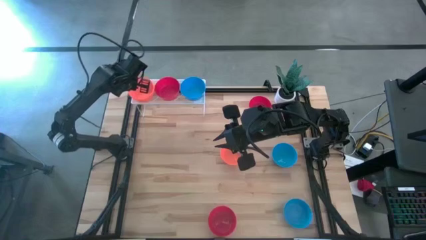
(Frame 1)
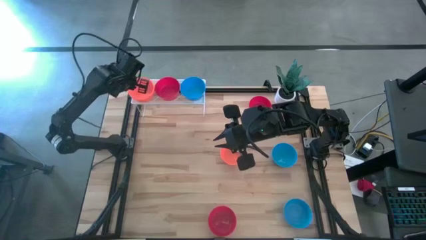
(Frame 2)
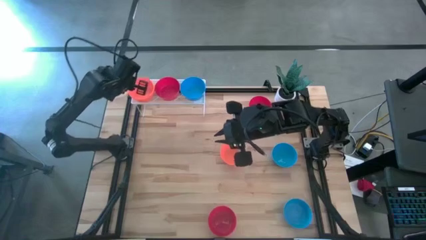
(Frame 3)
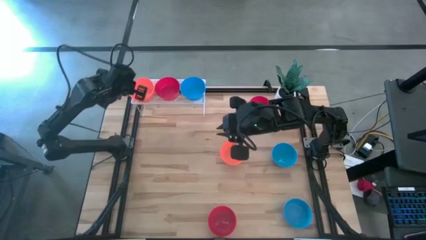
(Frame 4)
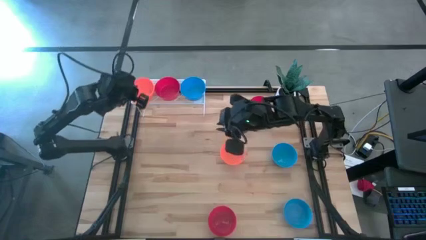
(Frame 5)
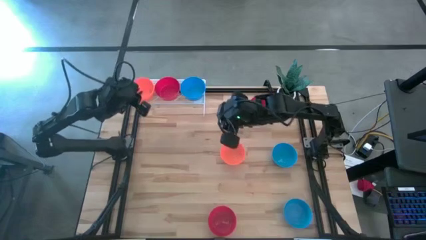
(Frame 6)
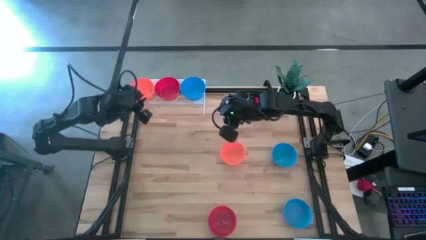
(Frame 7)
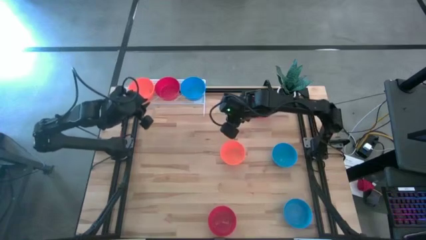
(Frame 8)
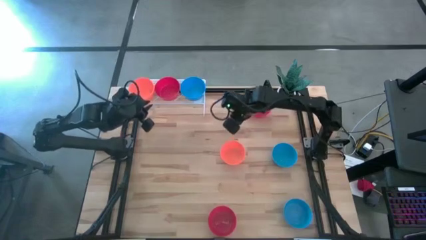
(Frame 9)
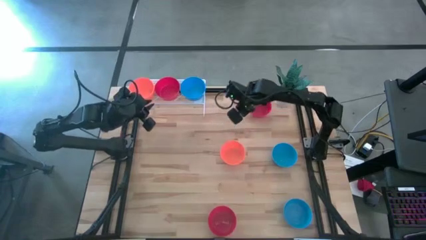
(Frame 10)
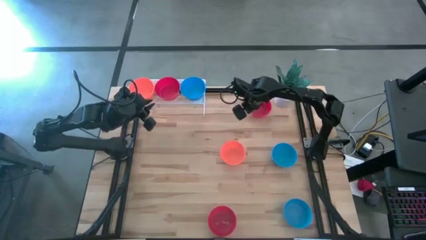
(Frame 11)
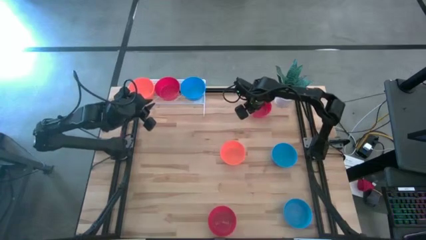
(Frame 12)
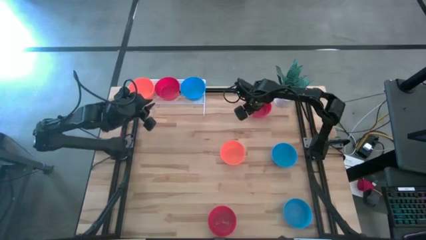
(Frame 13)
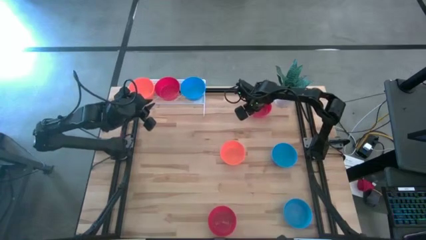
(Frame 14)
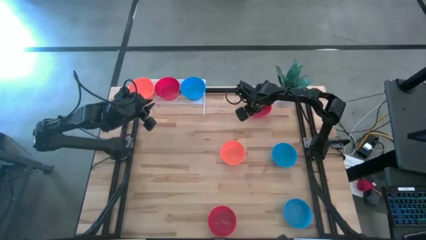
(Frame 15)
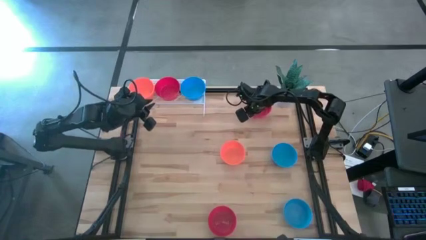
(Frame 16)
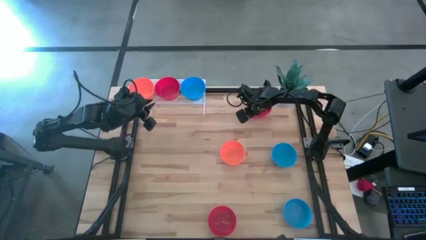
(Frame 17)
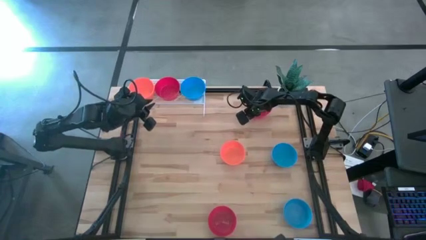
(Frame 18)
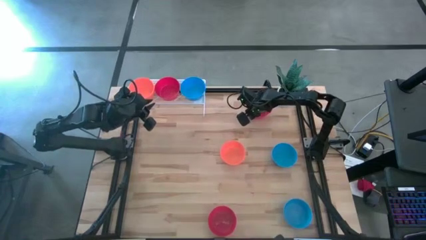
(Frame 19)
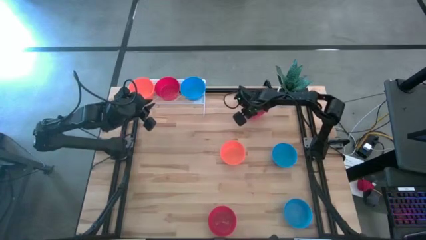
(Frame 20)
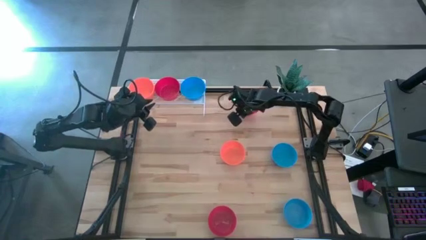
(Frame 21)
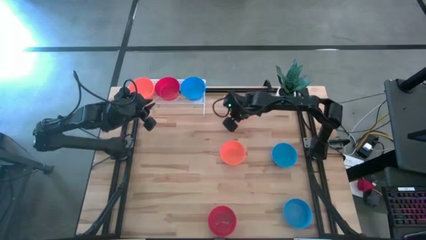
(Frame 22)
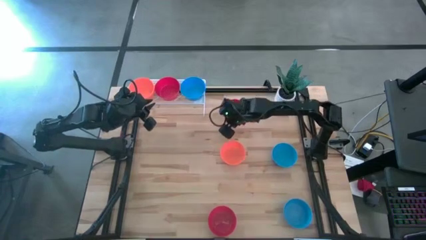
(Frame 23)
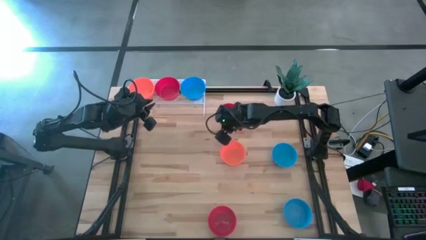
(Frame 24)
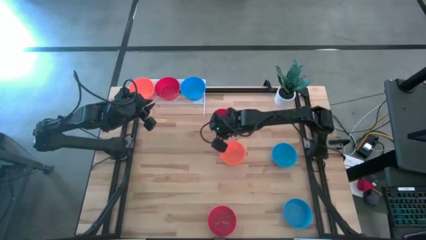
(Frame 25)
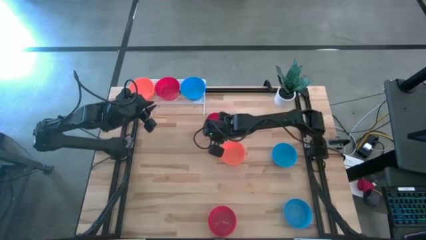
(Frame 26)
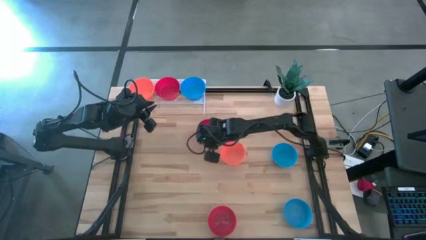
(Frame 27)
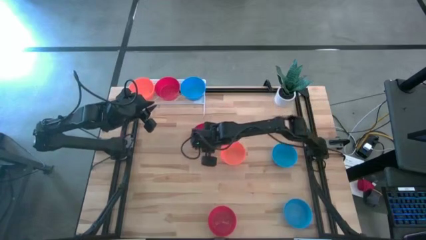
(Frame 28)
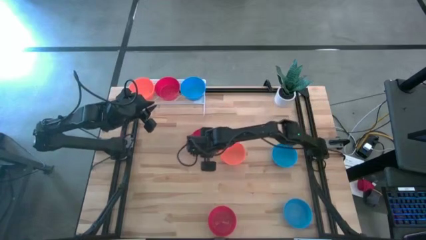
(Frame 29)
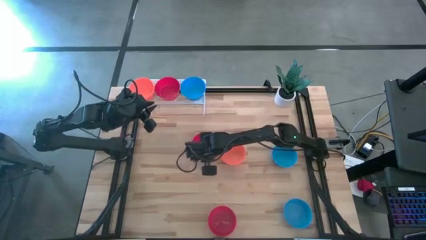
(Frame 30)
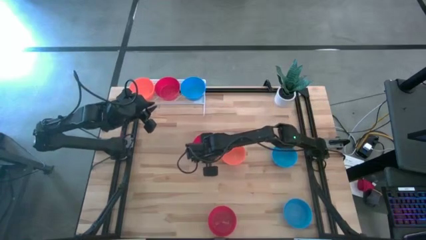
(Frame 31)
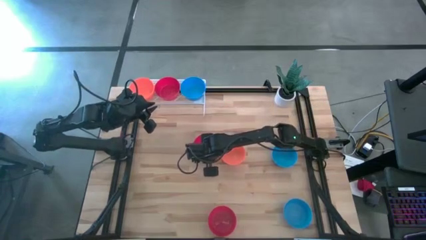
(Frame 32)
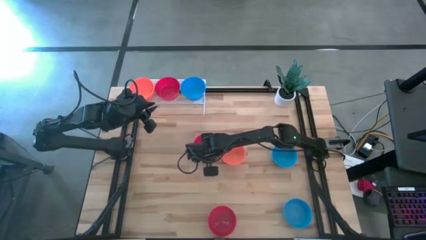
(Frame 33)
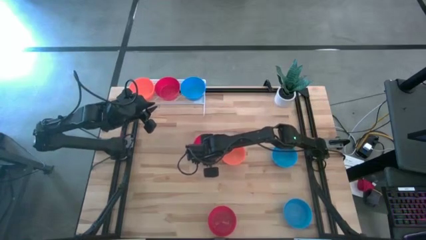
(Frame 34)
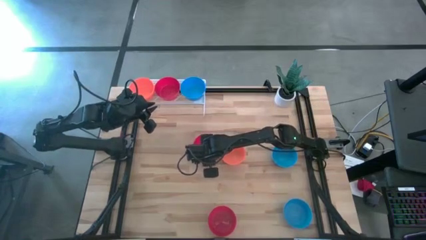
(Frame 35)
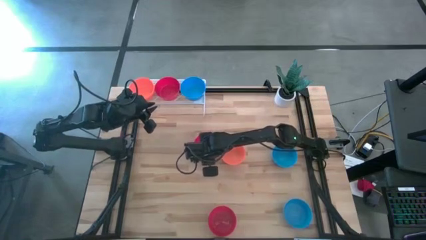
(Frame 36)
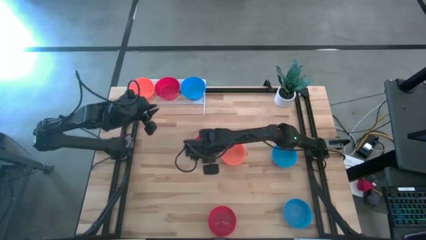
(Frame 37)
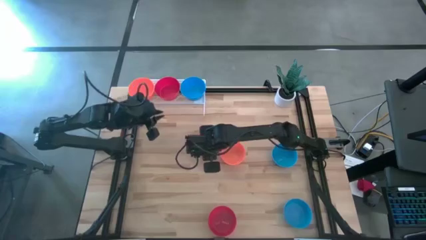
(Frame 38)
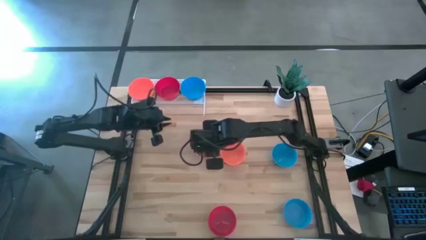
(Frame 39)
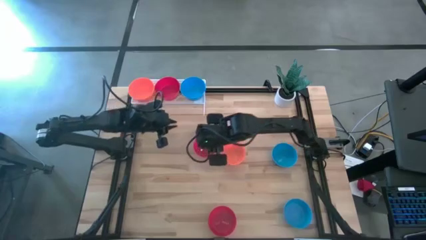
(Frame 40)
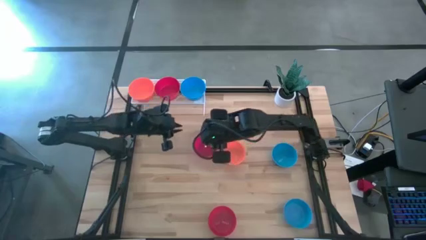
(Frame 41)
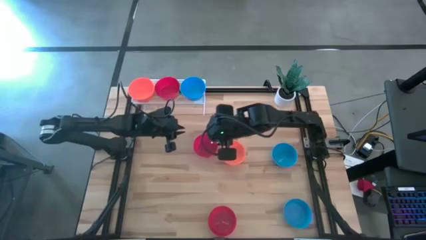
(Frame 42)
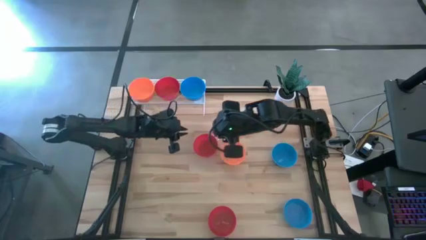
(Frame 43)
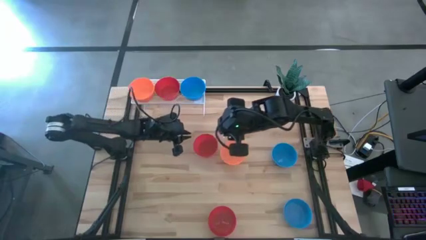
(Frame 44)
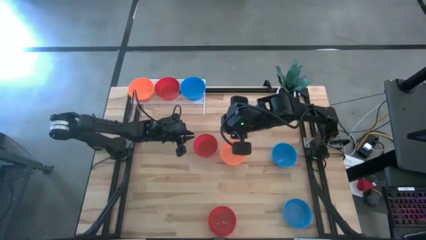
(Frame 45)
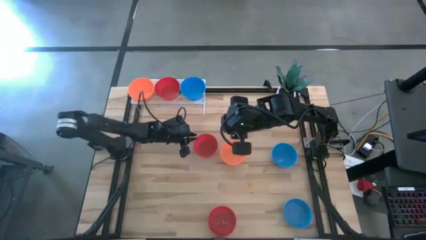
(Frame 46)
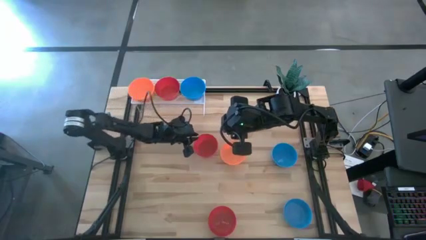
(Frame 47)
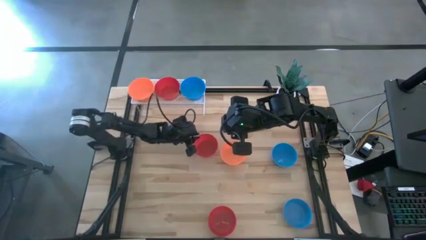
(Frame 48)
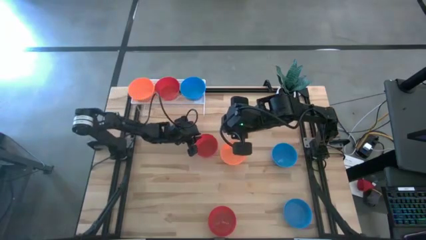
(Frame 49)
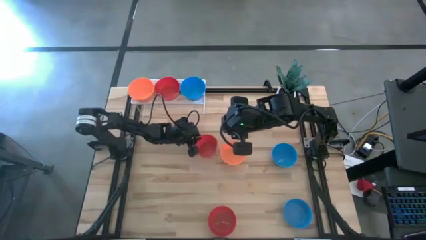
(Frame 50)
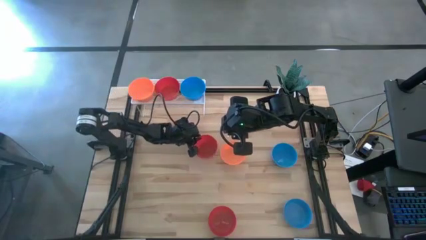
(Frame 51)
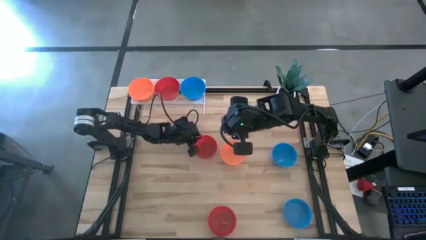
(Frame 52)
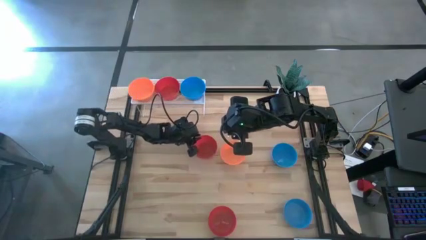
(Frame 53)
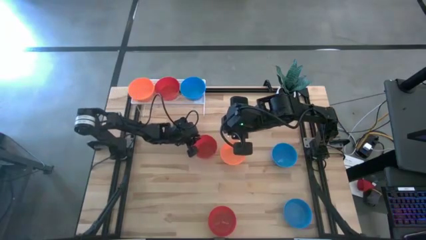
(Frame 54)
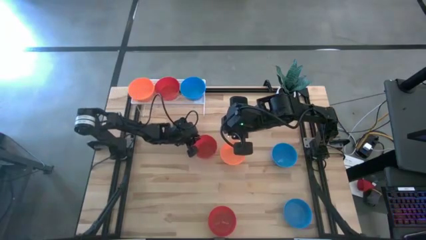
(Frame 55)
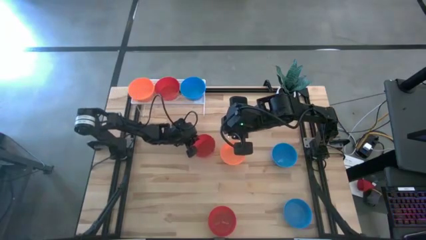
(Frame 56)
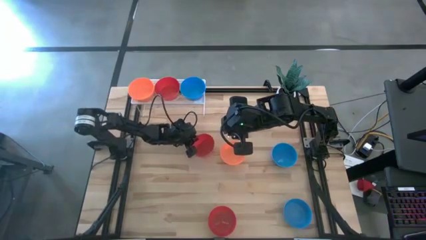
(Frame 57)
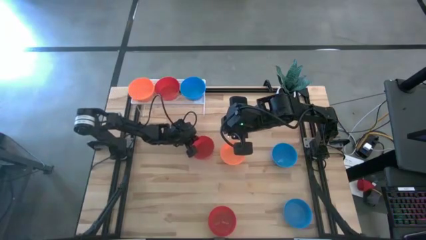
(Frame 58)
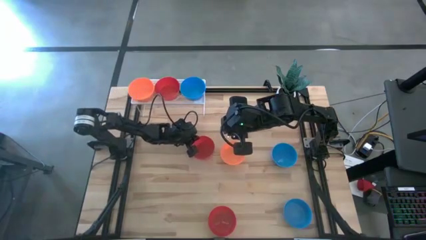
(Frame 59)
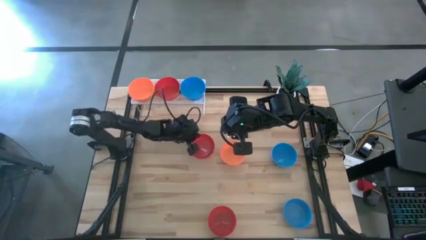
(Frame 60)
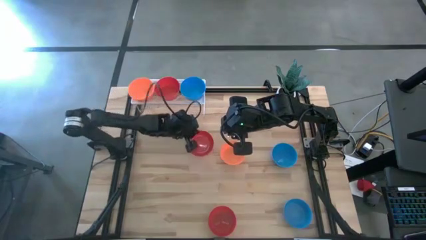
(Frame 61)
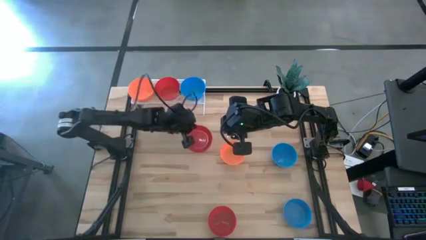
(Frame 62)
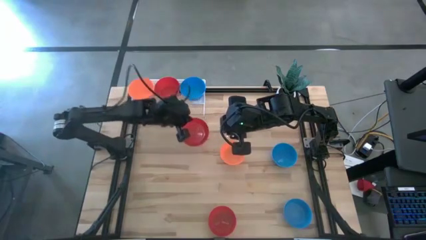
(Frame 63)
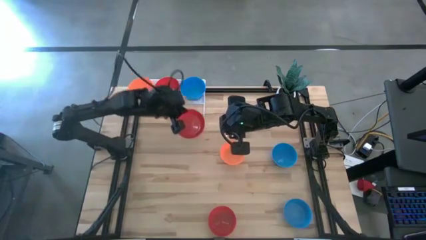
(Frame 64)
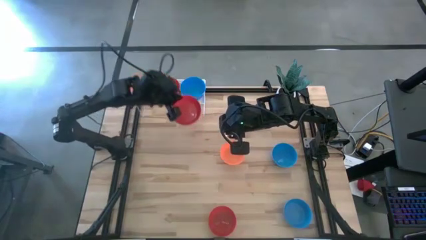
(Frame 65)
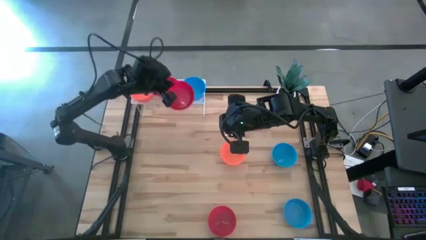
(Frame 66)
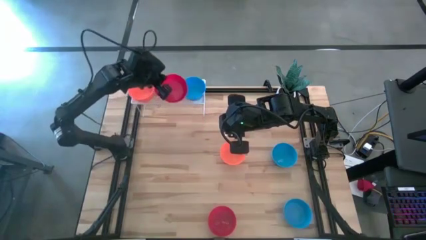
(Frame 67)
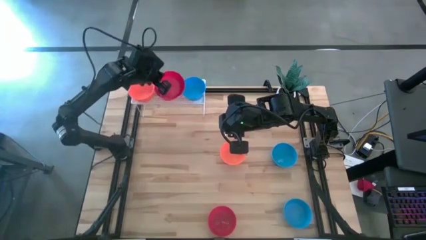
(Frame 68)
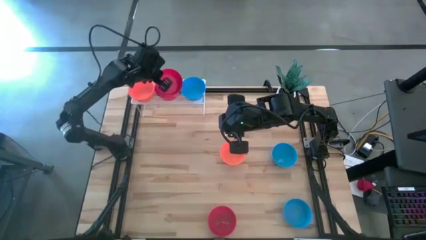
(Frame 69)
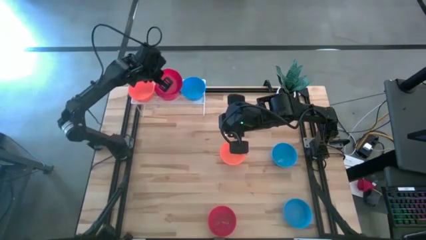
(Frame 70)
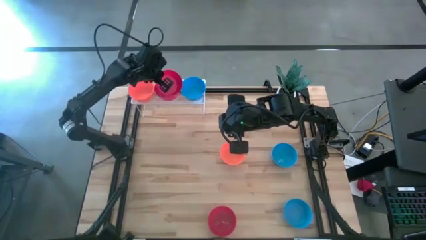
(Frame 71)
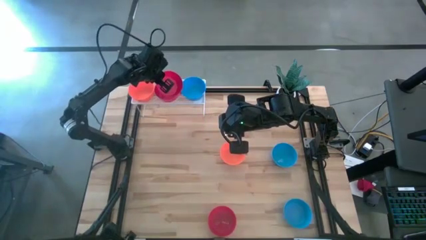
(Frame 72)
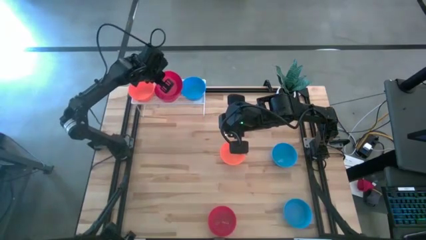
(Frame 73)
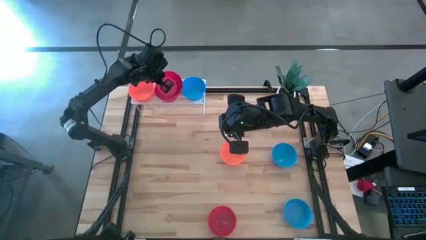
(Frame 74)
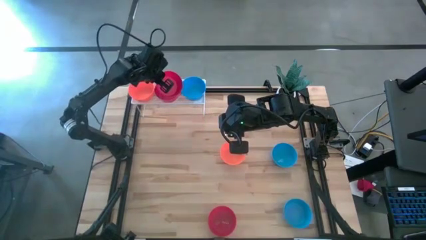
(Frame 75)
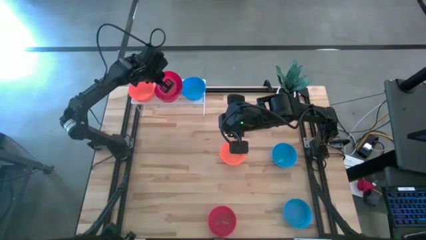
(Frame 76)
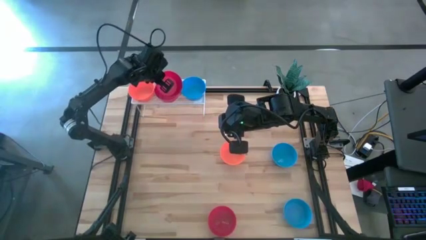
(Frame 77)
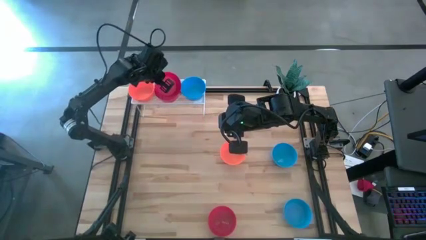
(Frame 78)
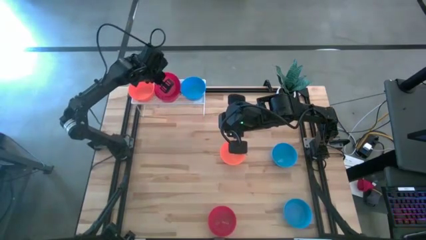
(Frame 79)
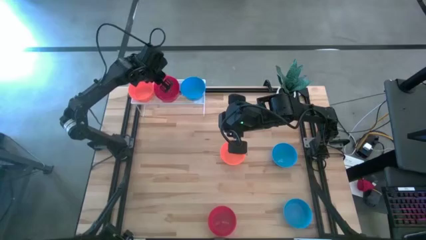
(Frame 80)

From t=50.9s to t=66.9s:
Task: Pick & Place Mini bowls
Stack the top red bowl on top of the red bowl on the shelf

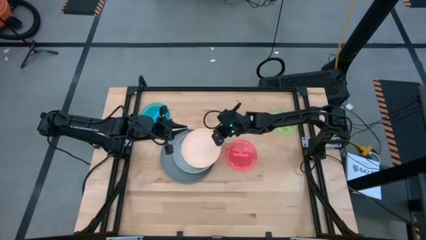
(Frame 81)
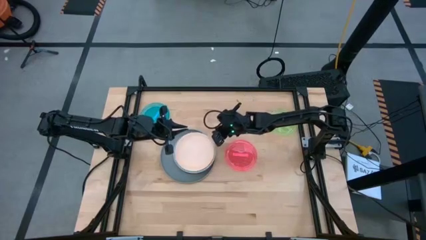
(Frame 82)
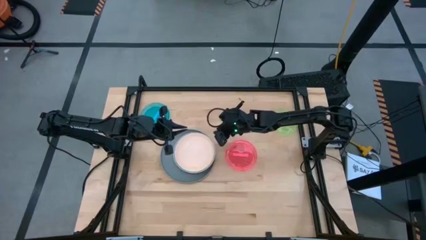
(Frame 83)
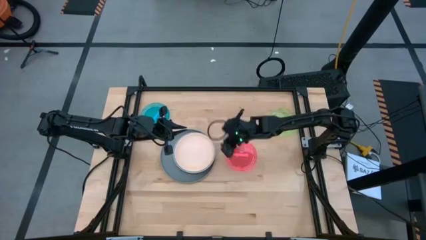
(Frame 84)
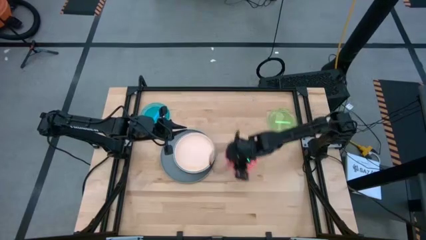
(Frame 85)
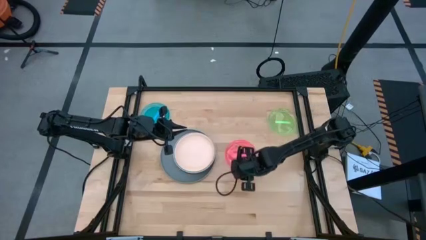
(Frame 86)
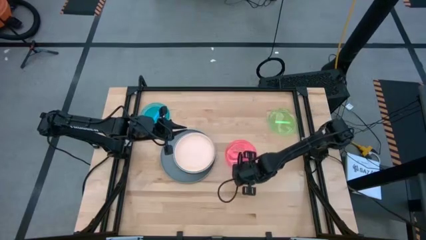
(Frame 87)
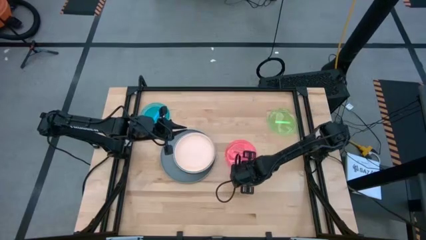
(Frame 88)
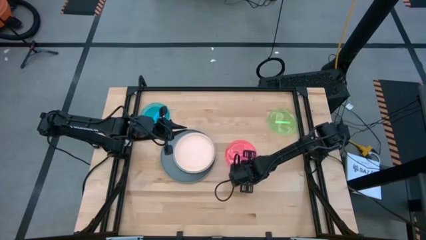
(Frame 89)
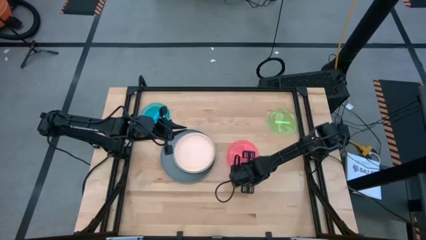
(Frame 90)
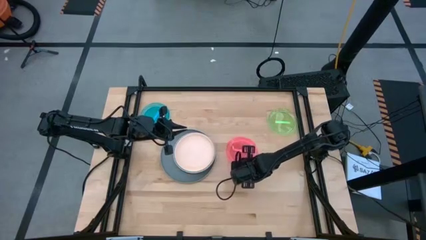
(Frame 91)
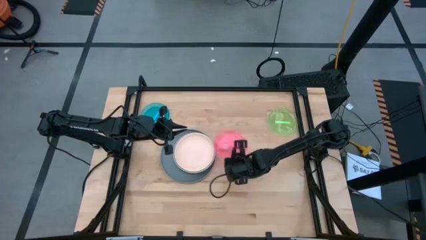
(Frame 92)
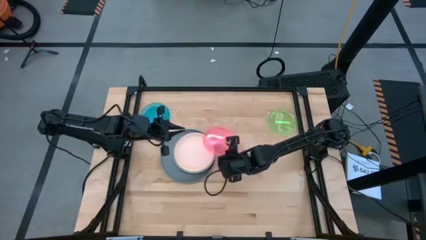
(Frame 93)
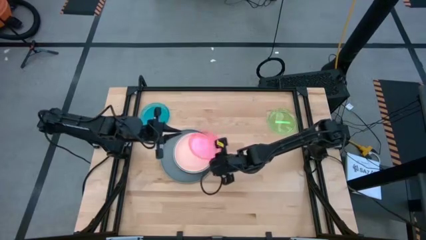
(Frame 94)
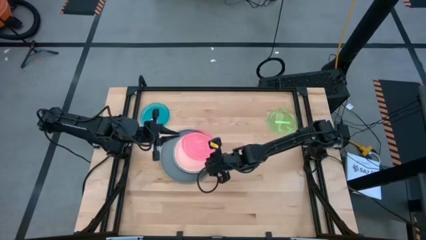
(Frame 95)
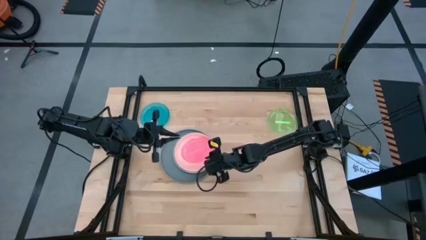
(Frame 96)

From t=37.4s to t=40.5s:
Task: Stack plastic plates
Stack the pink plate on top of the light pink plate
